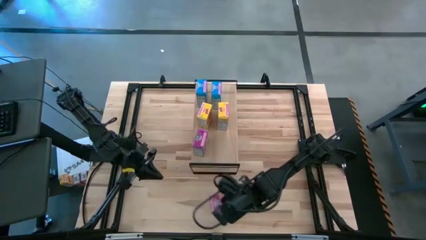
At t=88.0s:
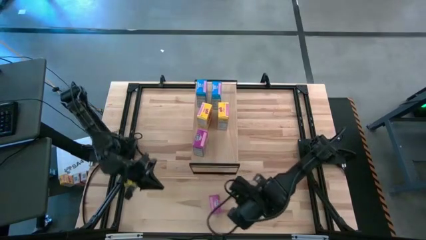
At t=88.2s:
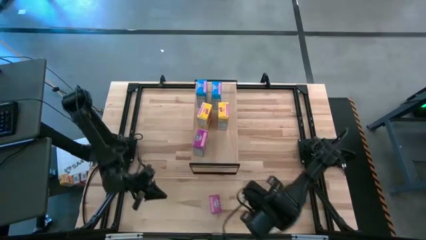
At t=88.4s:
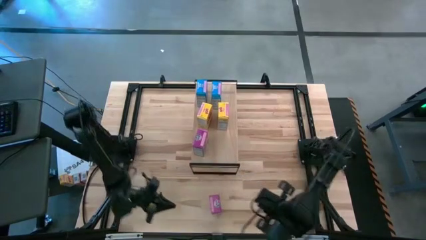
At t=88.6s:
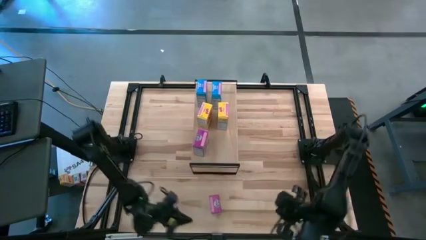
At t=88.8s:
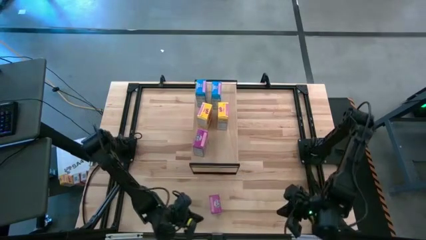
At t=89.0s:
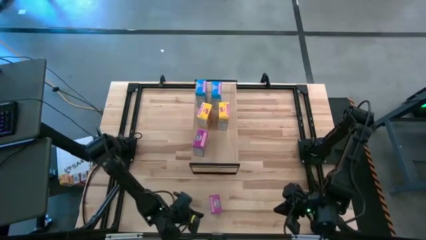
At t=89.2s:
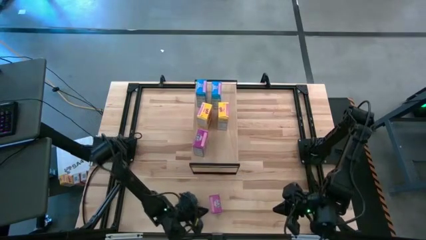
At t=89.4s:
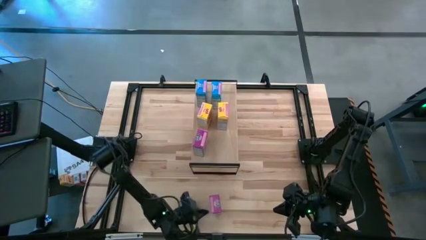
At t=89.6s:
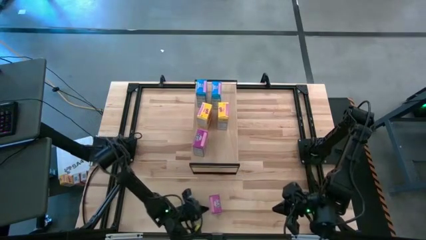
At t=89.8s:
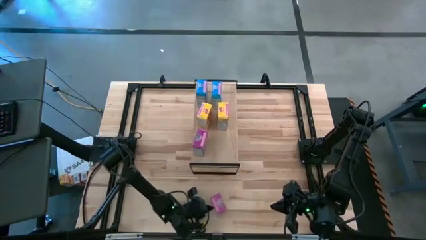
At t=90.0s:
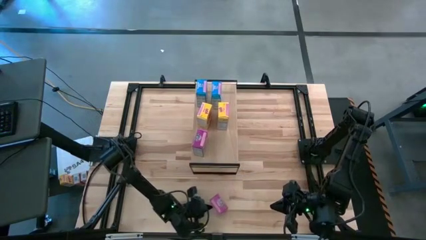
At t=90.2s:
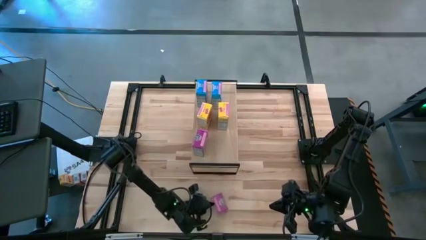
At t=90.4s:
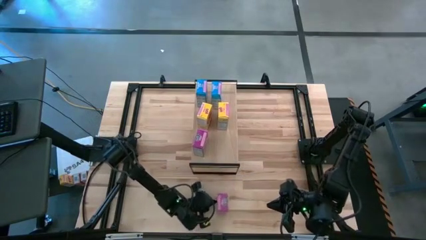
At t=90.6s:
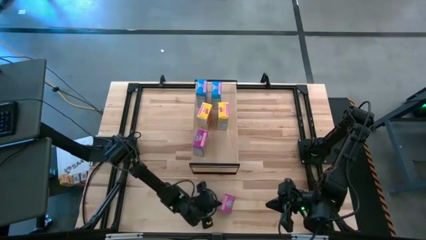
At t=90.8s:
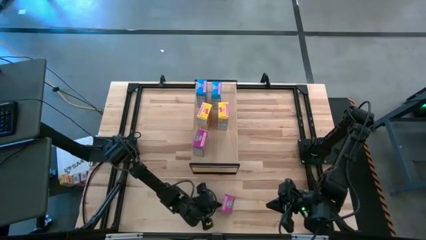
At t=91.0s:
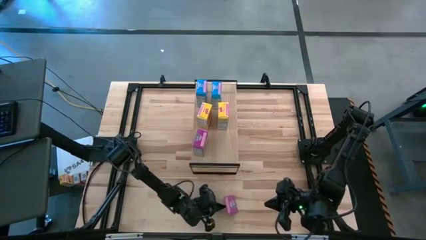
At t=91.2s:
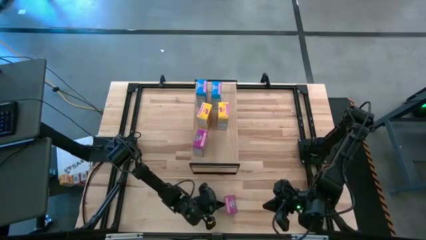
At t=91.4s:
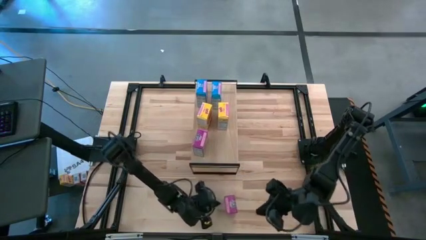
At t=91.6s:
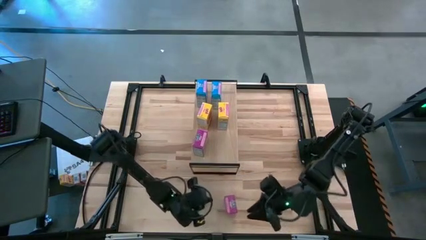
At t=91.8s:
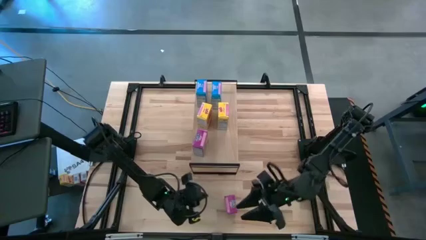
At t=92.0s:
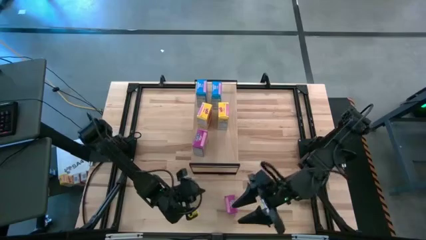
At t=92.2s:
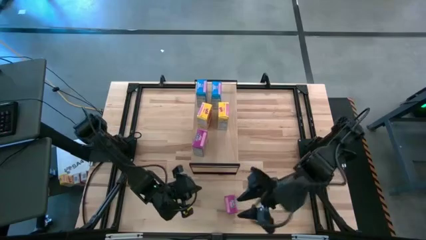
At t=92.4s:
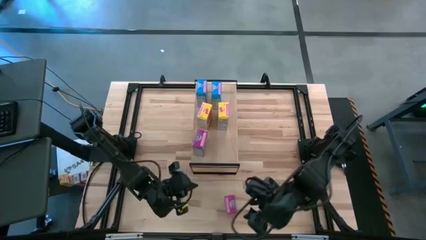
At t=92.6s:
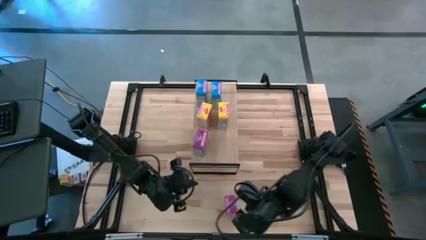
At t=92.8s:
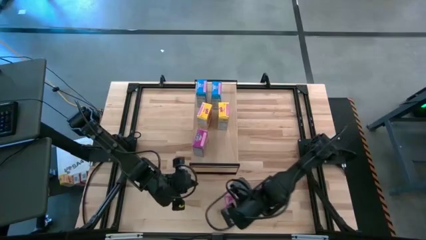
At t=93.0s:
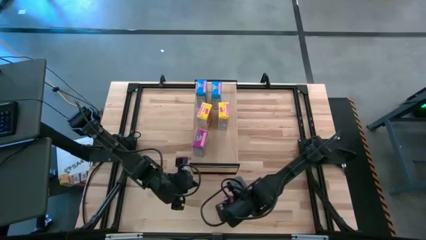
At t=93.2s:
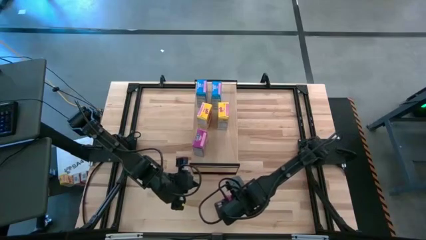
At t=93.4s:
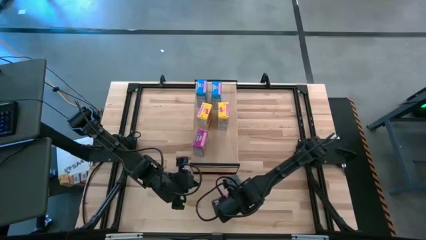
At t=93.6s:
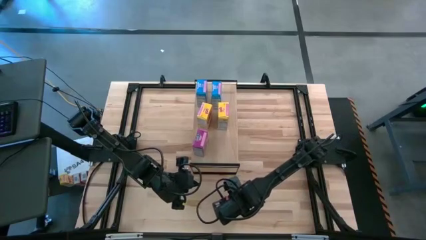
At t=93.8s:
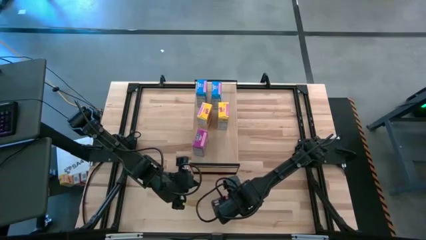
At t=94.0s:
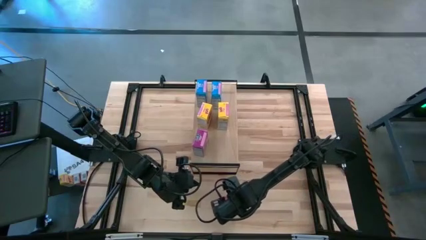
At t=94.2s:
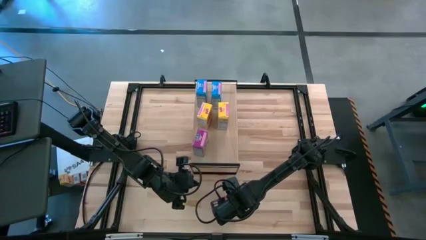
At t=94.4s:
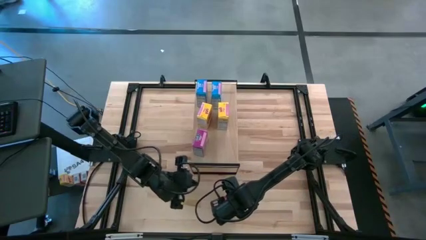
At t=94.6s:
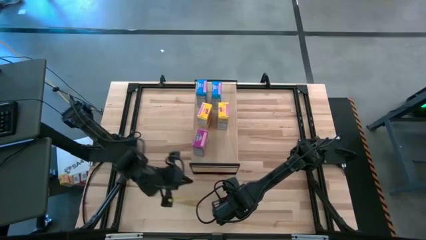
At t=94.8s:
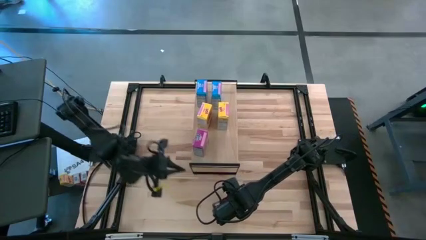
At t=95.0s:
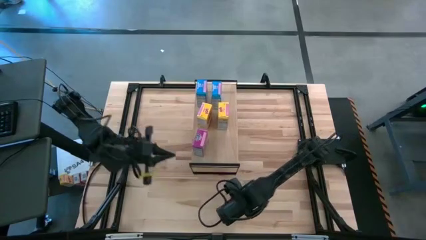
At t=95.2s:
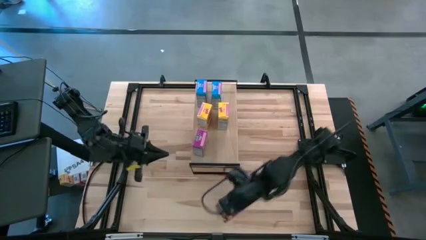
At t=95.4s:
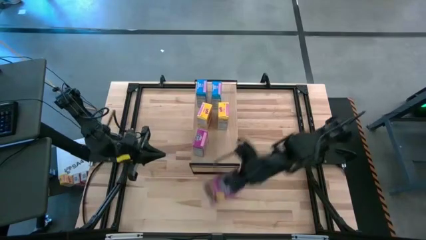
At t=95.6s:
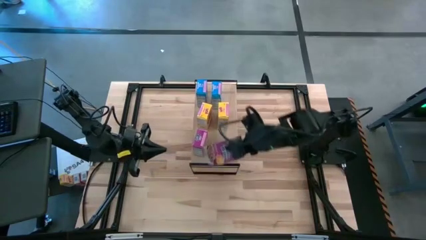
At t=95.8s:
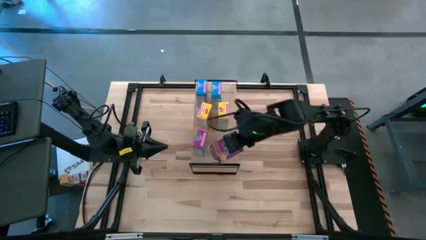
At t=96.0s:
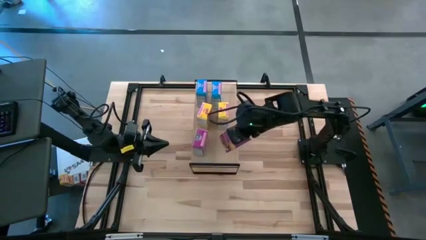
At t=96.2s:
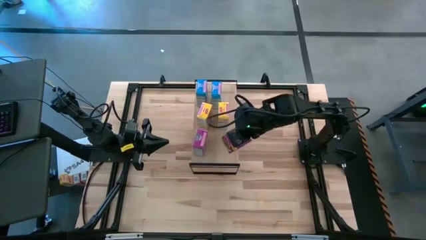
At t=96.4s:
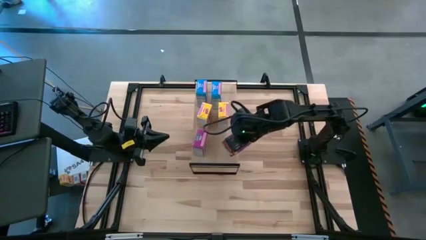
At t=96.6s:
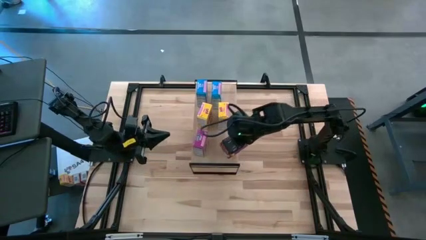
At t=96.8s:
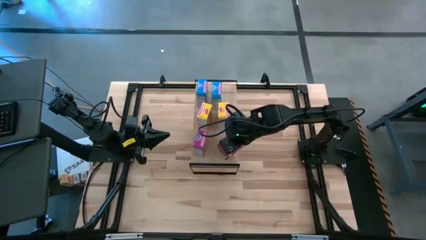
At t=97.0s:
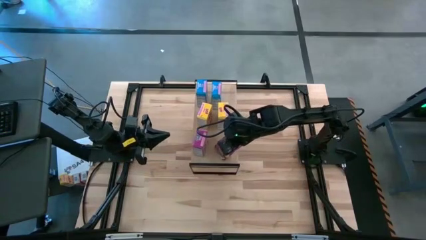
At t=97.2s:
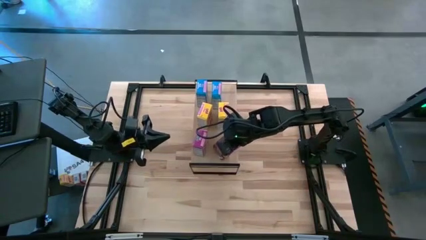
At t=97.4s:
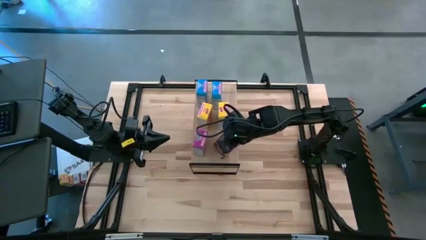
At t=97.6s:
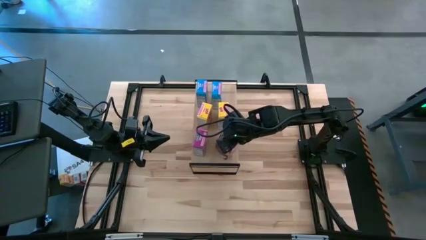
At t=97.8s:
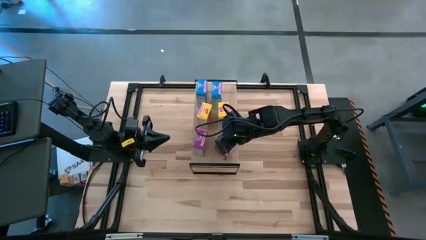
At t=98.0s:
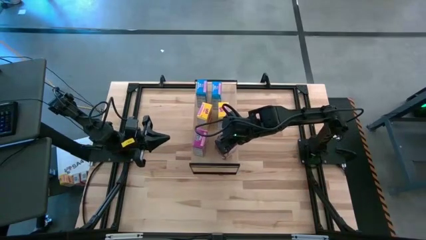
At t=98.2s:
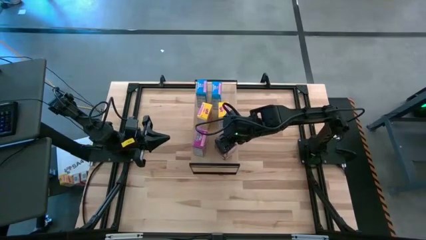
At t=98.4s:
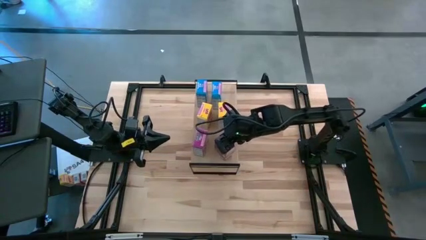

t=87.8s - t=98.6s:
Task: Stack cereal on shelf
Put the purple cereal box on the shelf

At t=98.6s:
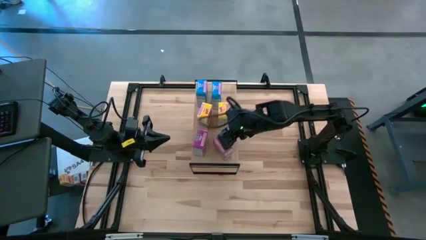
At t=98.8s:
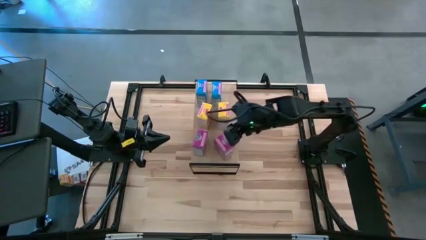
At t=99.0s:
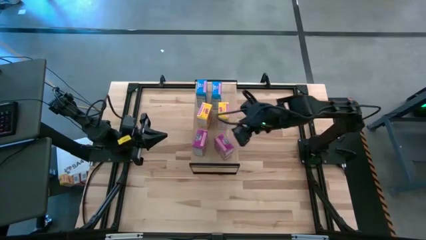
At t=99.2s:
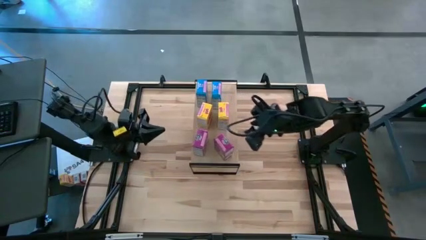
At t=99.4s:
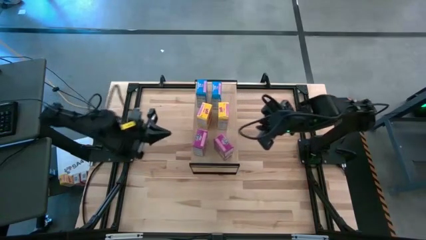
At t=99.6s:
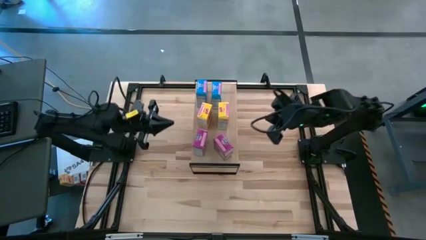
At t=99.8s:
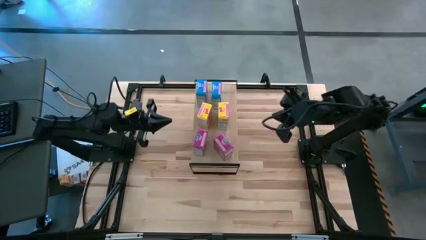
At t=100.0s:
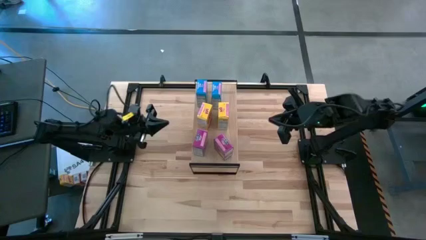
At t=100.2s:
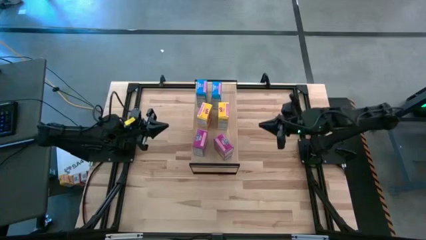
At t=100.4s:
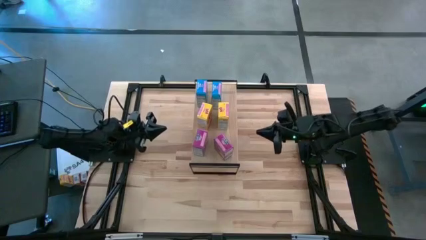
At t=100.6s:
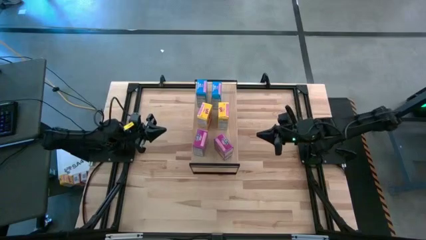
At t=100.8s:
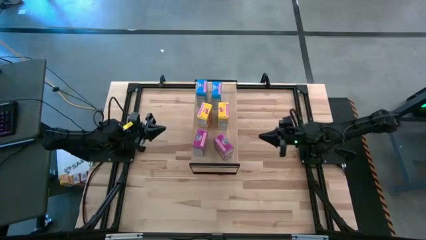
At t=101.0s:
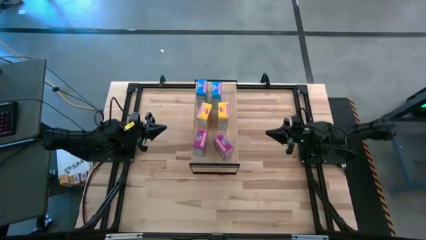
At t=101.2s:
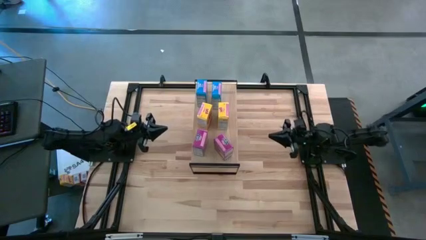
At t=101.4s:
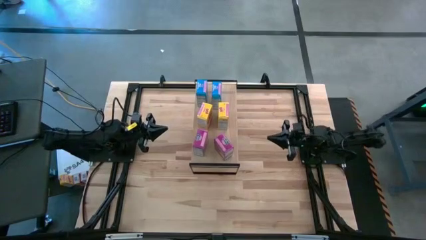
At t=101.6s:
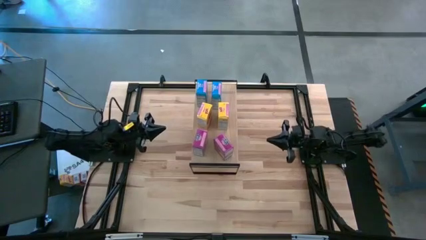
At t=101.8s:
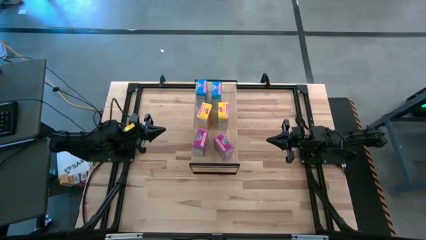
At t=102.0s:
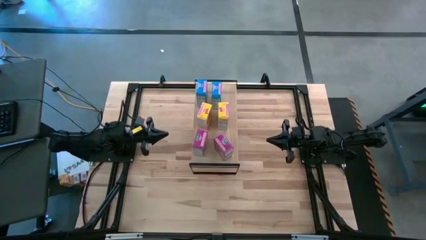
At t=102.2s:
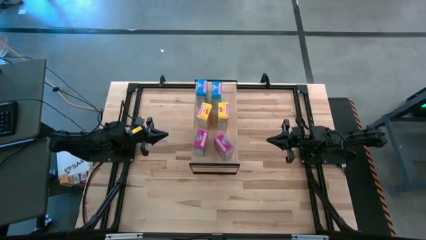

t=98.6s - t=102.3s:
Return to Home Position
